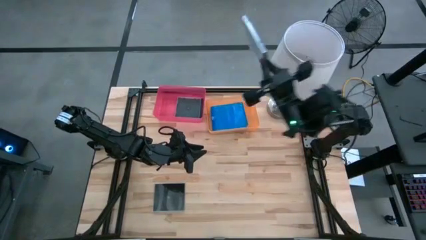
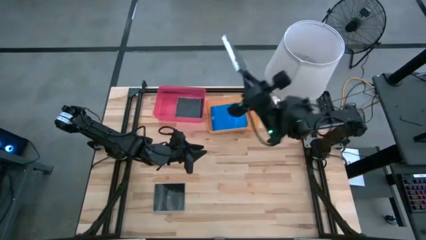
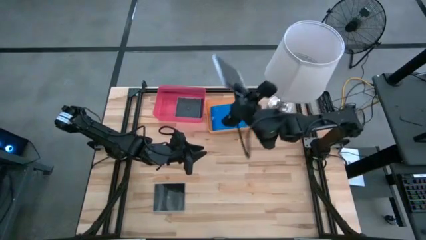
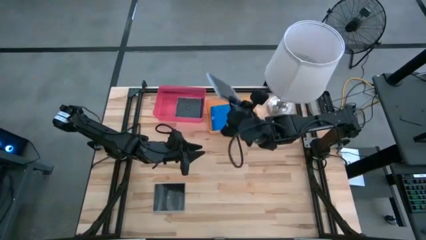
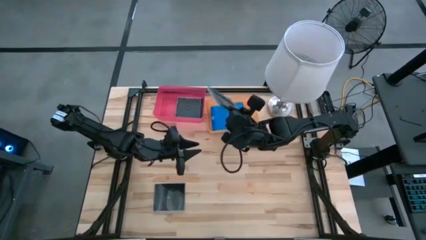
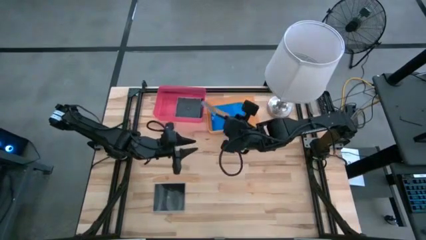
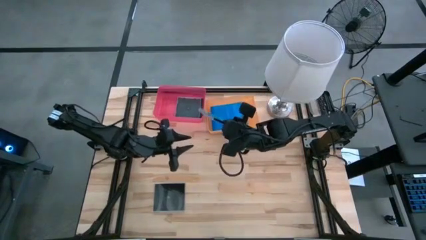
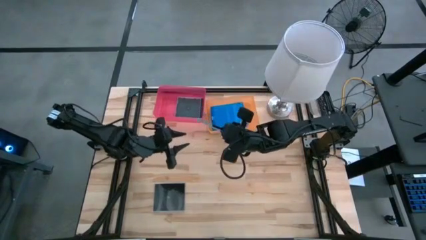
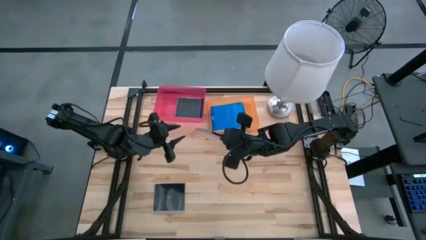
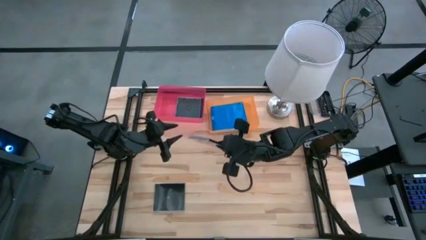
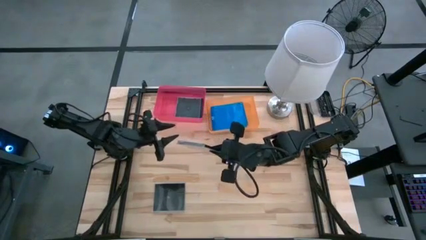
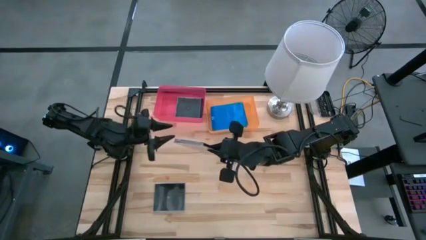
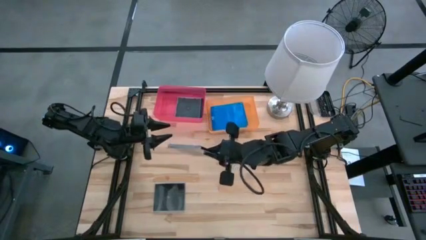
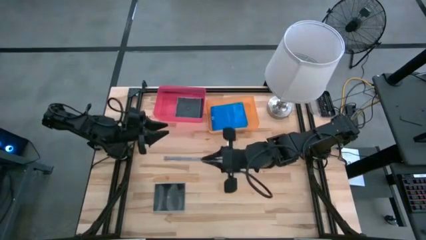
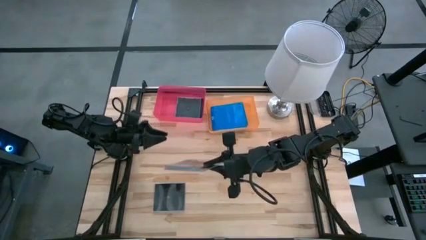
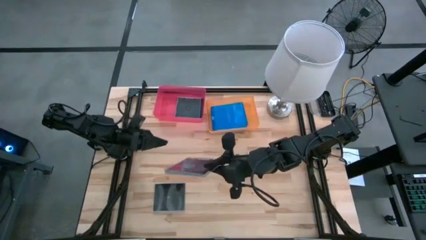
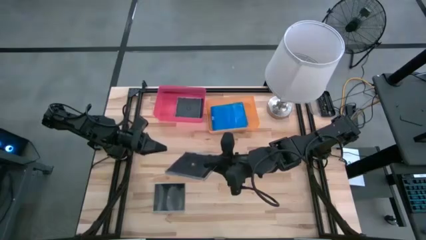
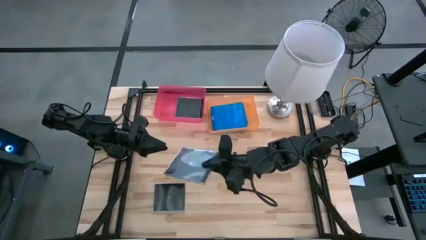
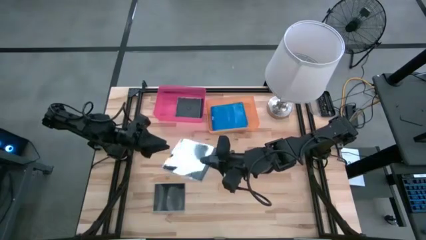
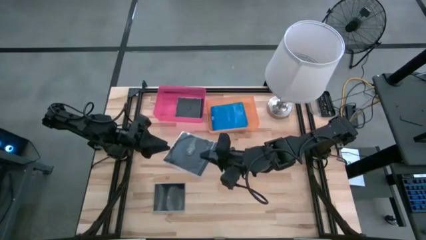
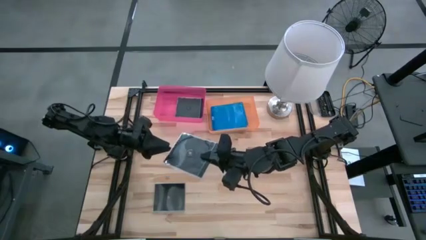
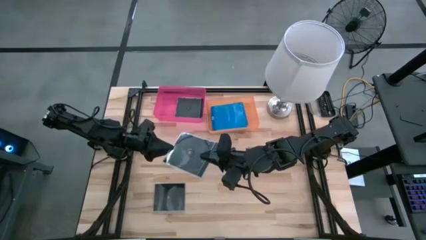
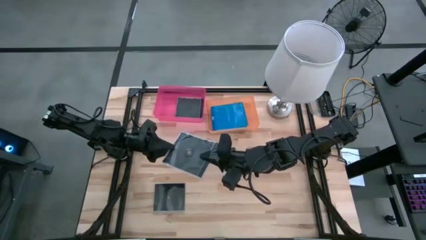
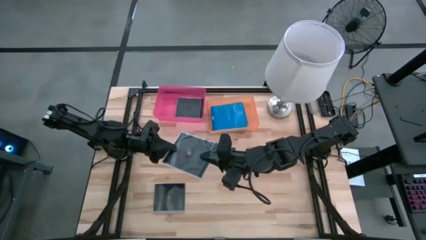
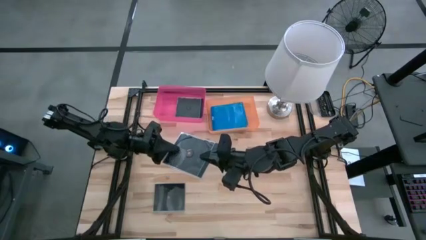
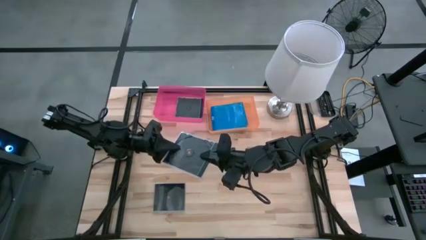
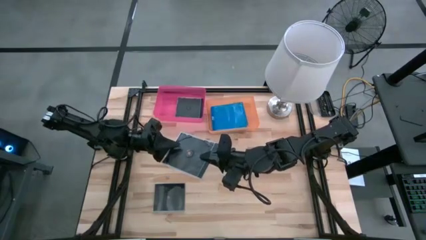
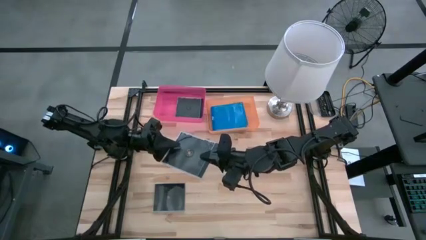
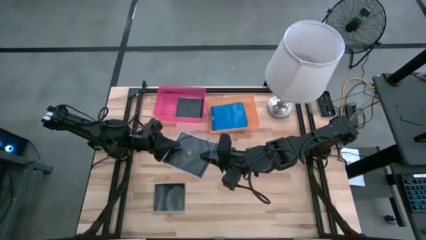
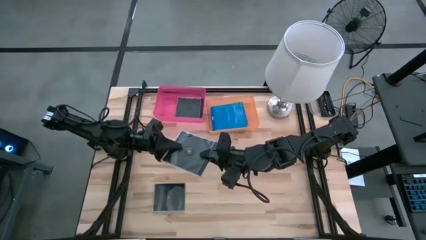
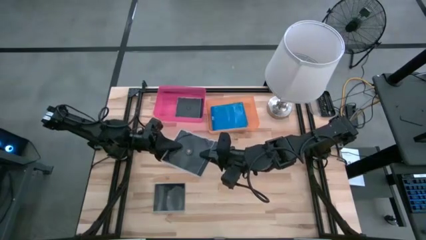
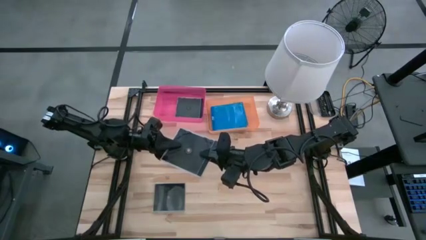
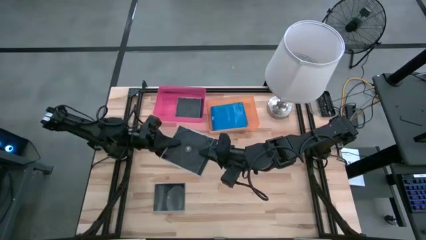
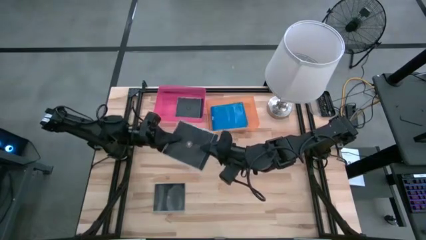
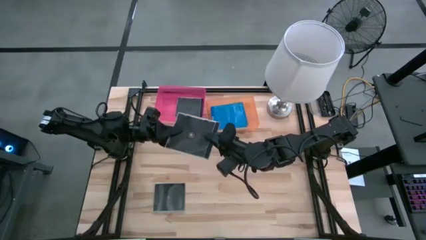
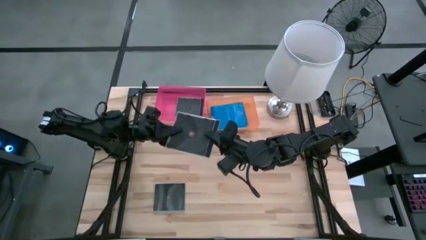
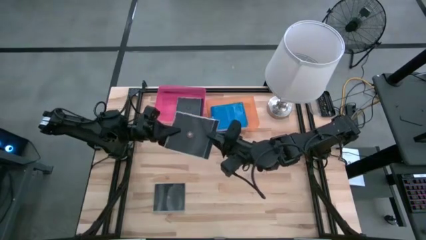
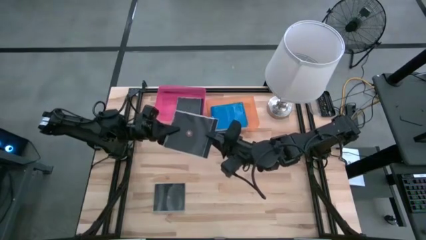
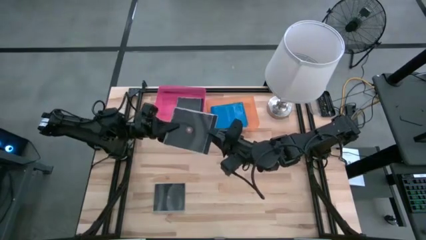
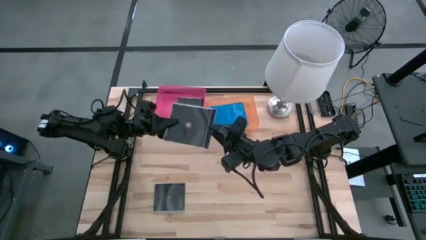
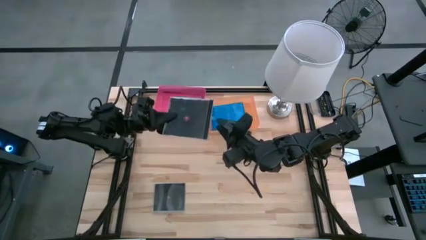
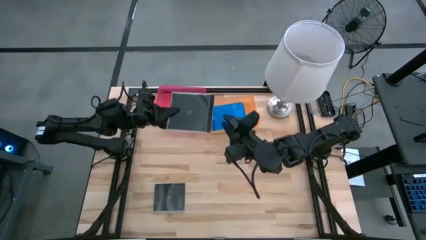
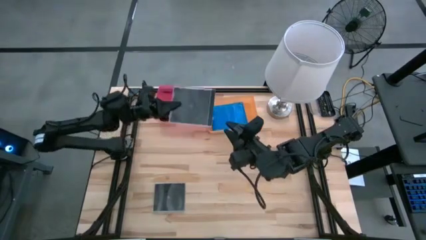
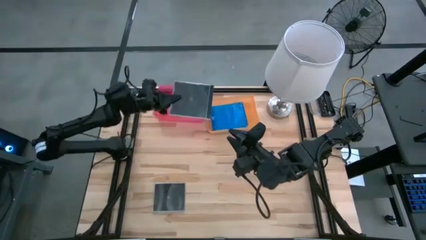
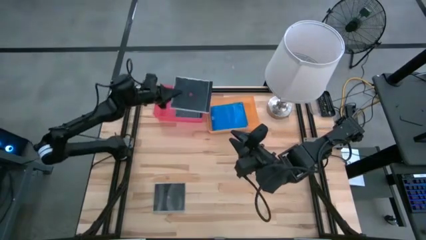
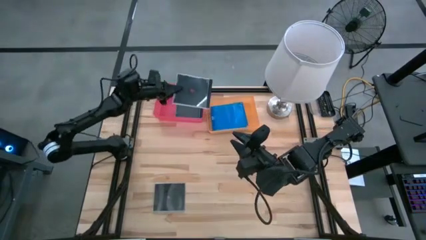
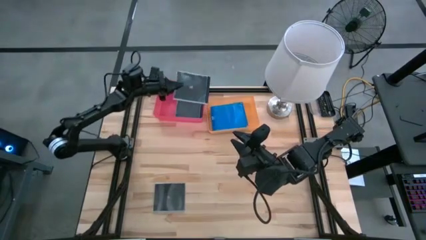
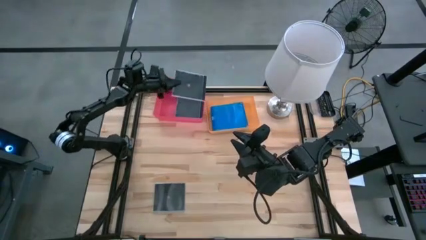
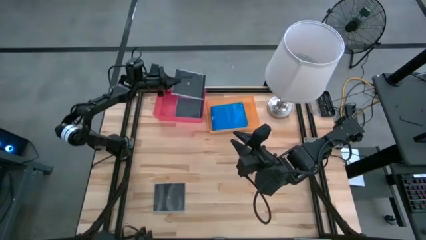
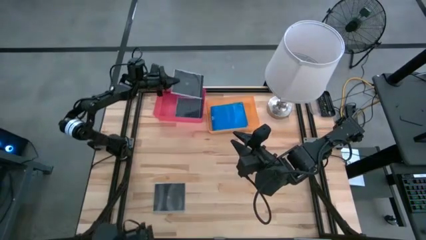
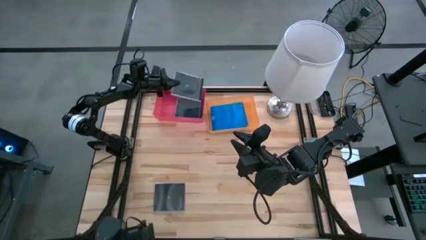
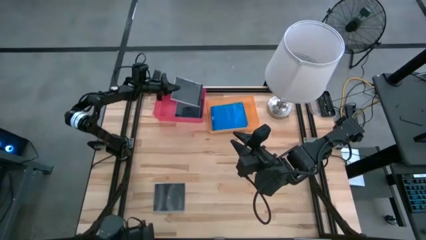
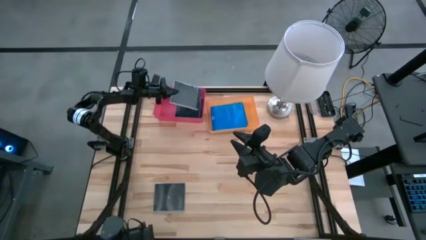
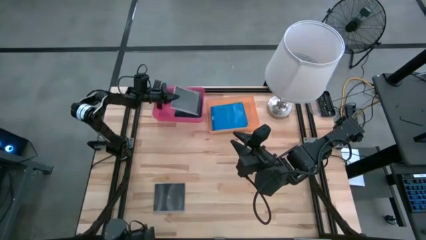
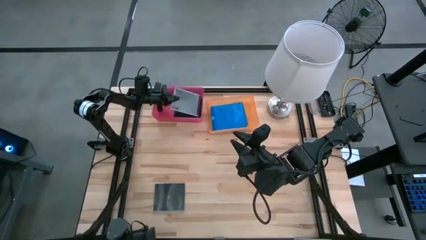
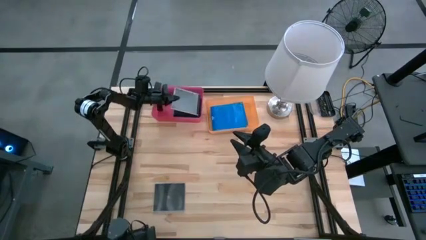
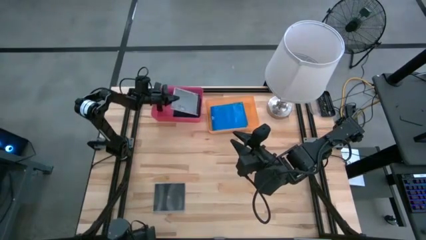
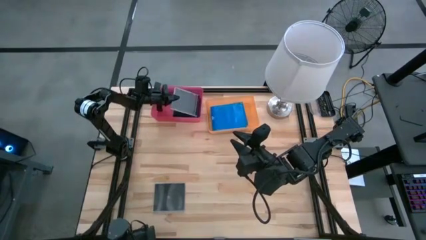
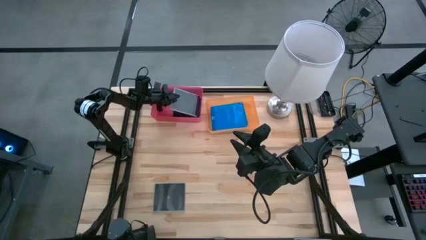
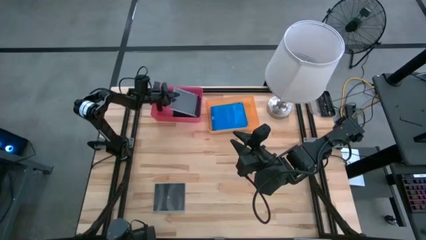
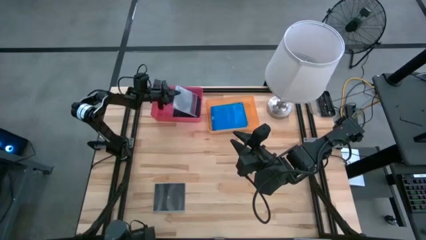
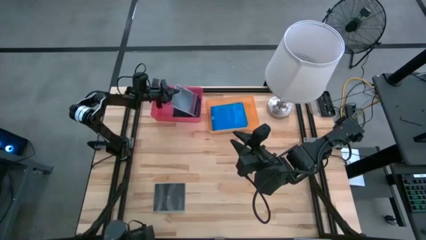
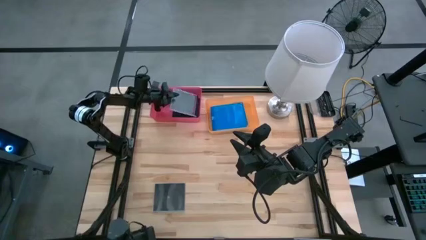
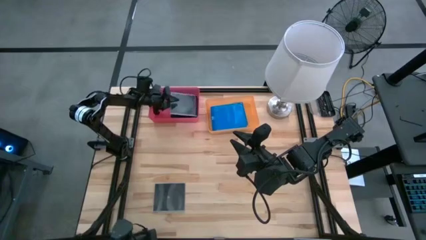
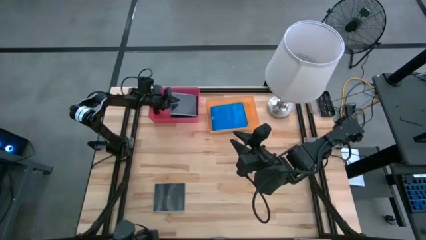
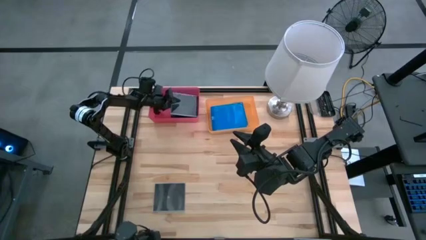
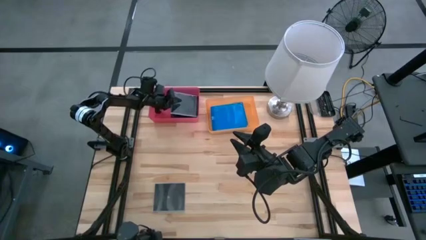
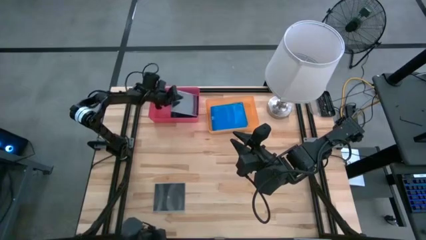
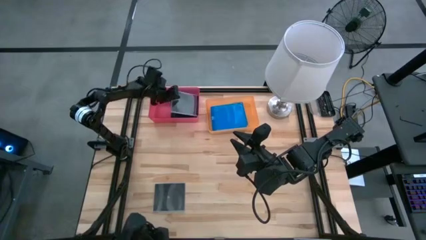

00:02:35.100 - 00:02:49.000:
Task: Pick & place jewel cases by type
Put the right black CD case into the pink bin
